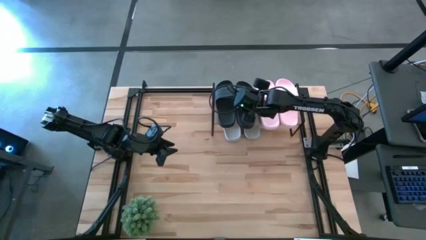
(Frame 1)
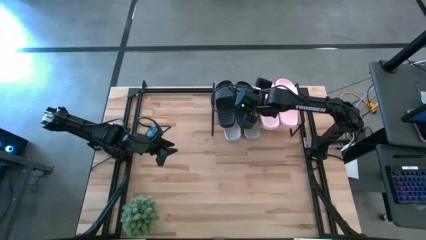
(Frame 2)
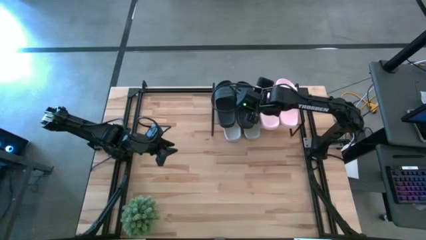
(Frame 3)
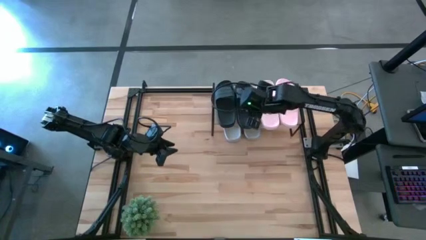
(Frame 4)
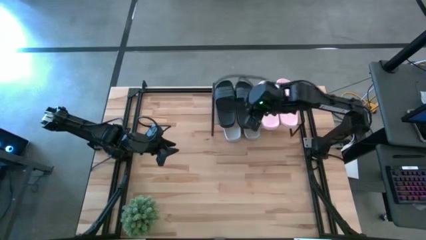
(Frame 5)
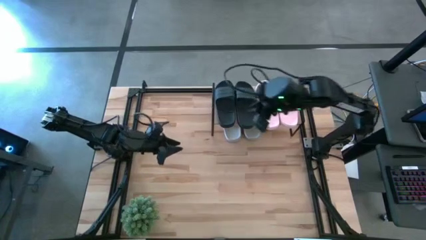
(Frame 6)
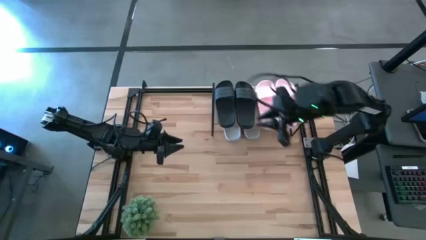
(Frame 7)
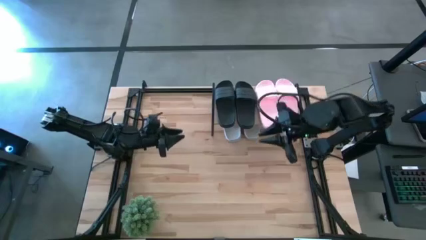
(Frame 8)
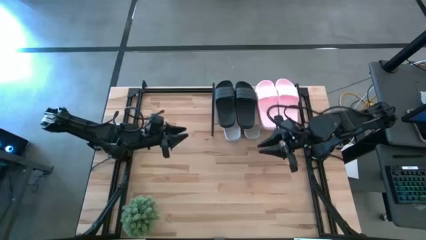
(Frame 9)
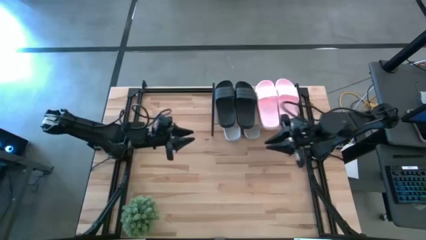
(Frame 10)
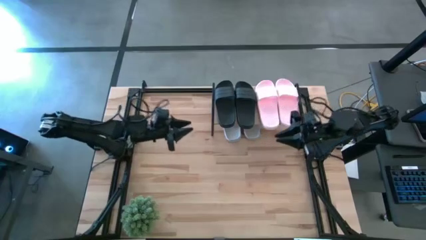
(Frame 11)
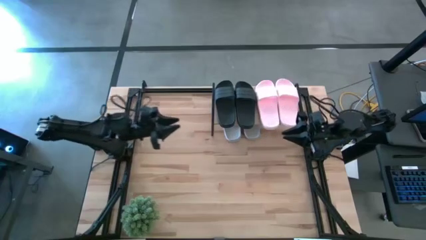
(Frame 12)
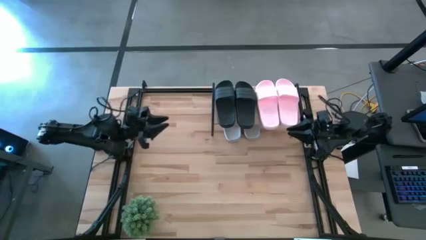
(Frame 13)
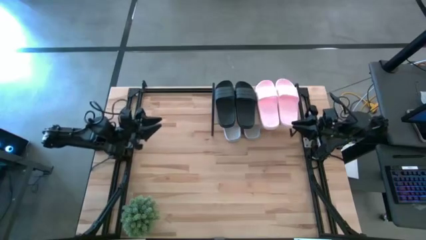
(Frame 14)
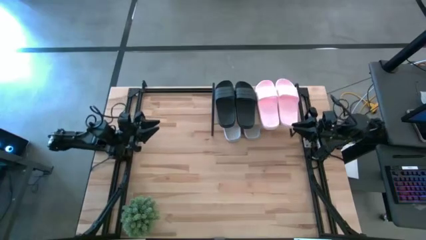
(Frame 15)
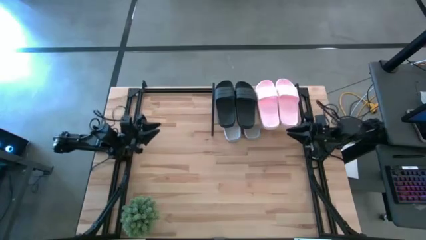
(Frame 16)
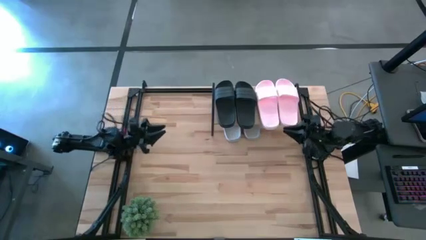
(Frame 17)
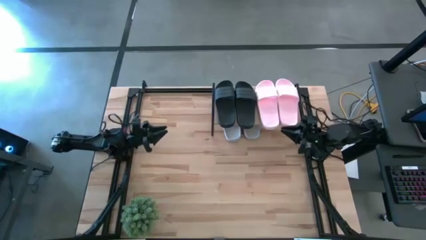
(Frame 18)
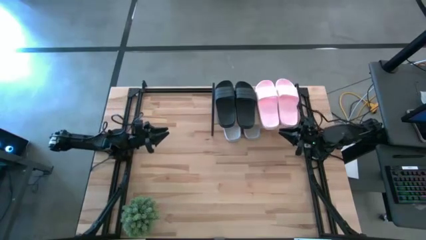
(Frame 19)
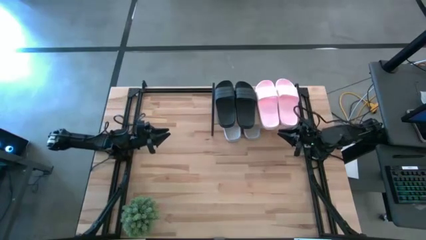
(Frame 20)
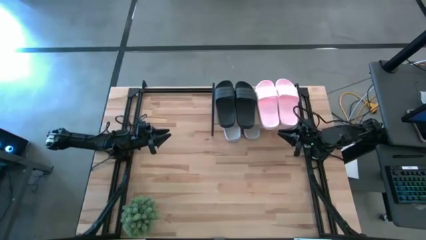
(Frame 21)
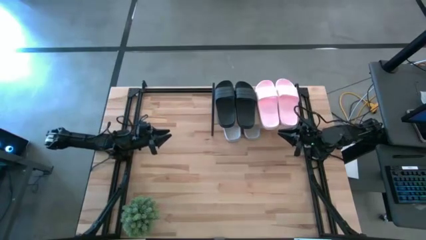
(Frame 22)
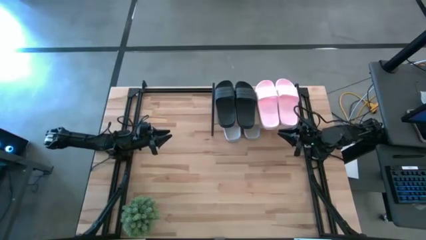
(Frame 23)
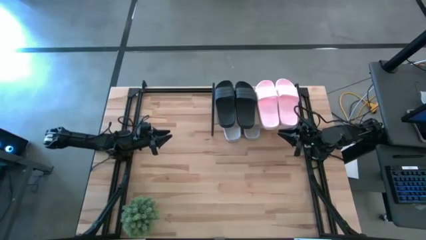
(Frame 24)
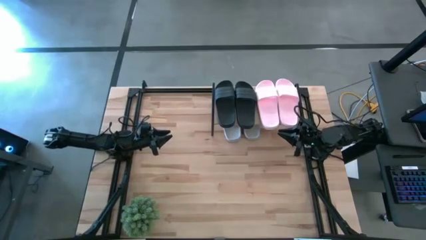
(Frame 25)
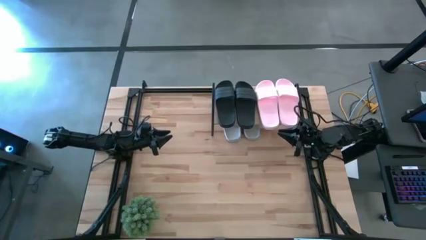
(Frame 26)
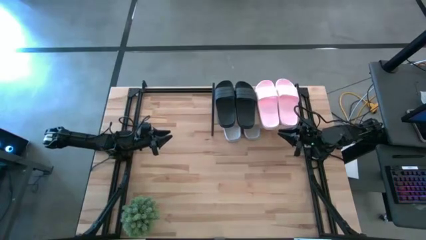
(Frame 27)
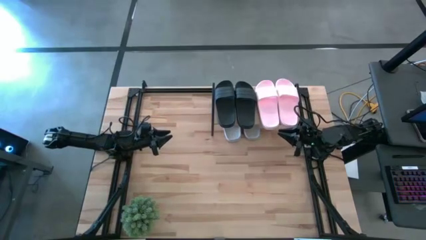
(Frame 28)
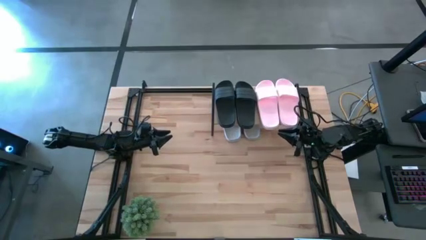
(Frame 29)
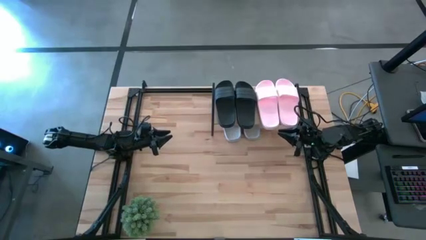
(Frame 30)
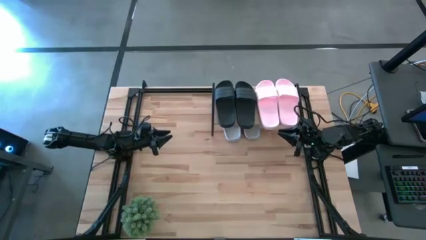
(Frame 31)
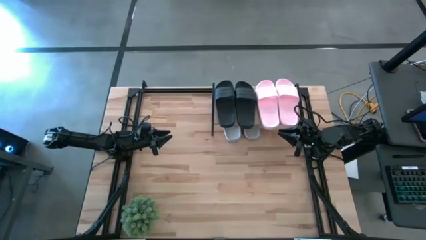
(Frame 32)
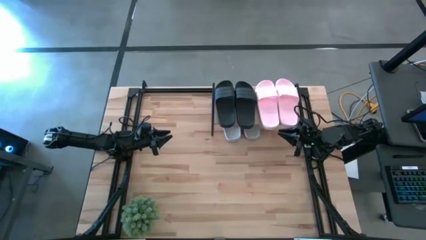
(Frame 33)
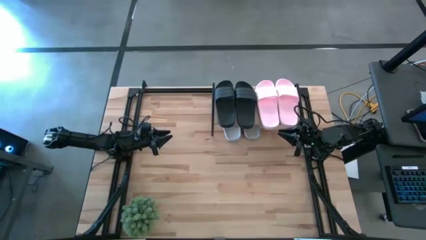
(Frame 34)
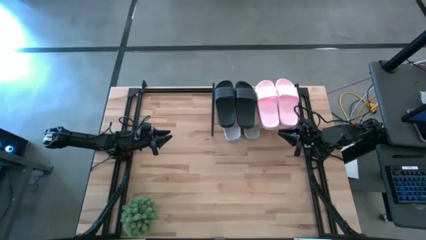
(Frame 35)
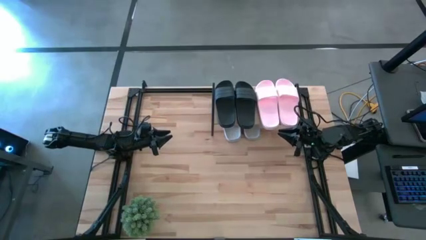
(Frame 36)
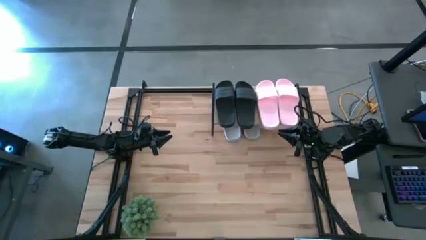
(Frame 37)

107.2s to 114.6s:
Task: Pick and place slides into the shelf
Return to Home Position

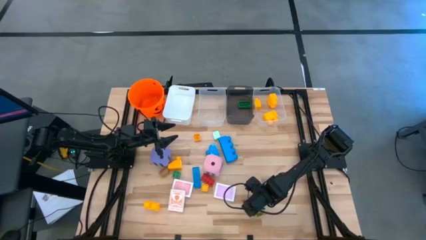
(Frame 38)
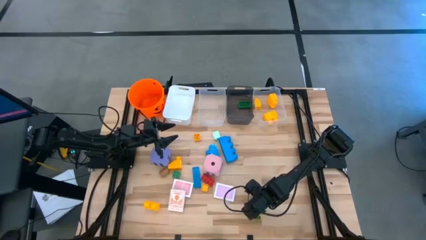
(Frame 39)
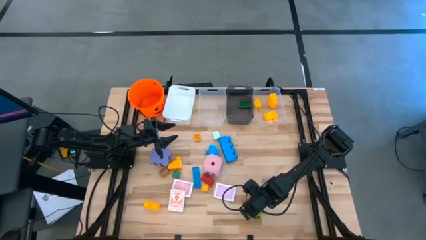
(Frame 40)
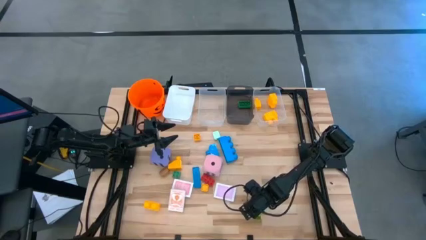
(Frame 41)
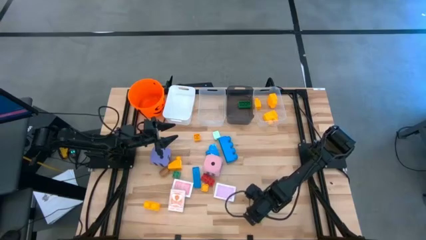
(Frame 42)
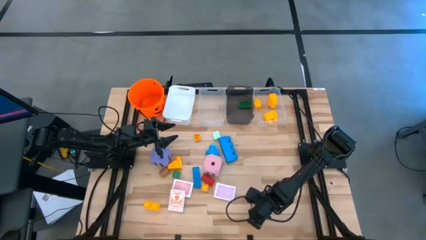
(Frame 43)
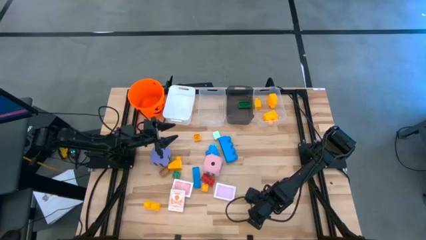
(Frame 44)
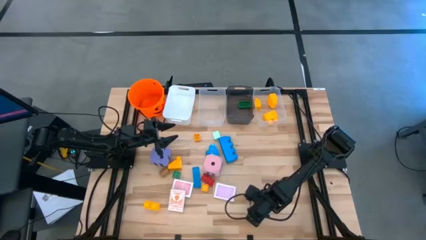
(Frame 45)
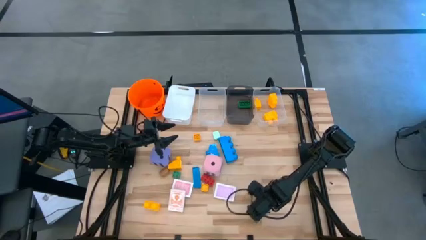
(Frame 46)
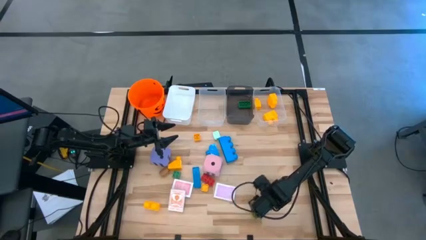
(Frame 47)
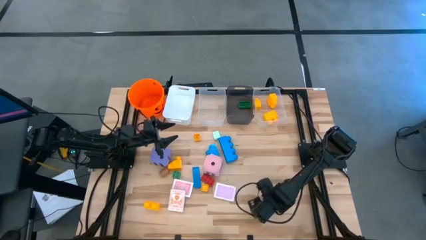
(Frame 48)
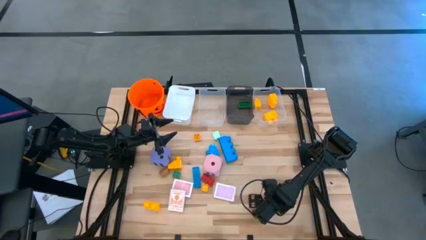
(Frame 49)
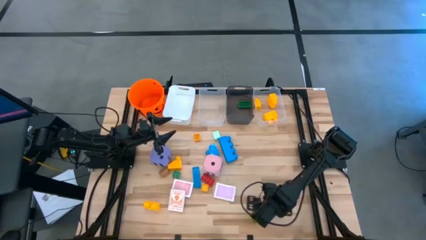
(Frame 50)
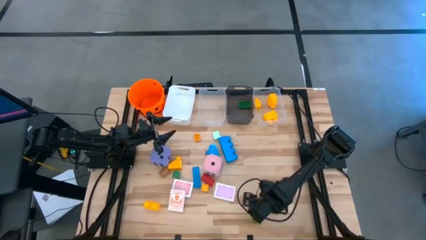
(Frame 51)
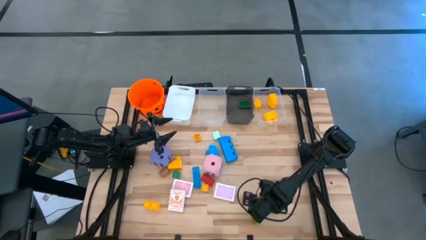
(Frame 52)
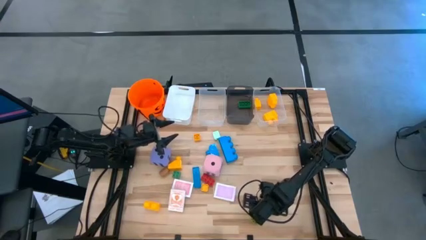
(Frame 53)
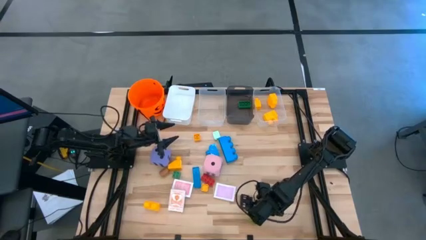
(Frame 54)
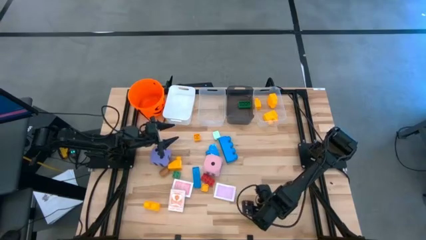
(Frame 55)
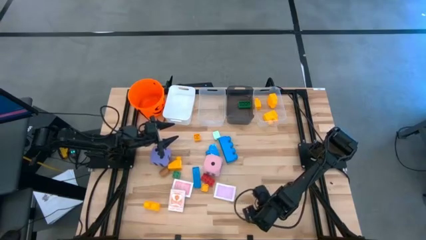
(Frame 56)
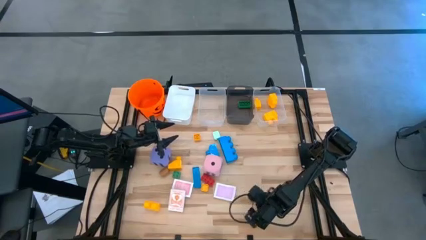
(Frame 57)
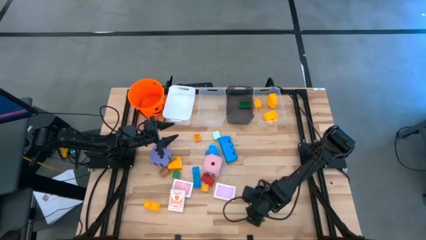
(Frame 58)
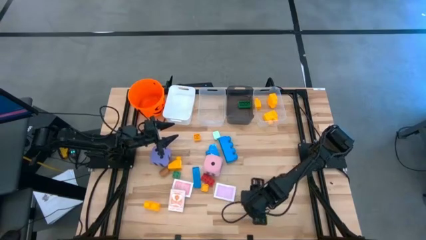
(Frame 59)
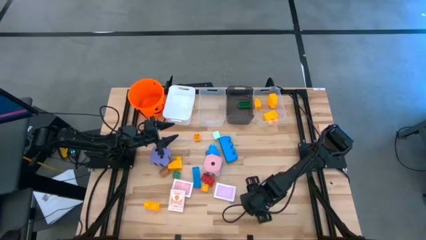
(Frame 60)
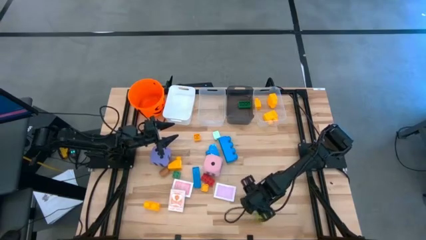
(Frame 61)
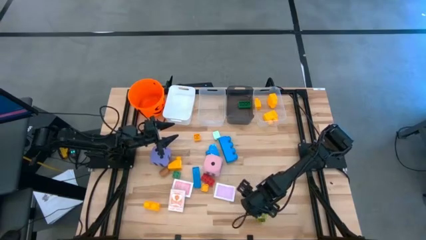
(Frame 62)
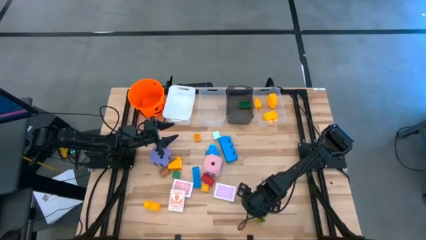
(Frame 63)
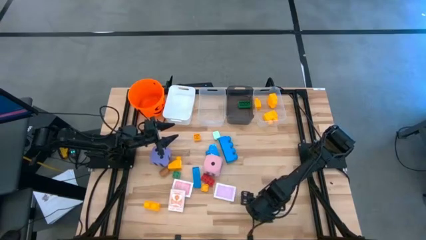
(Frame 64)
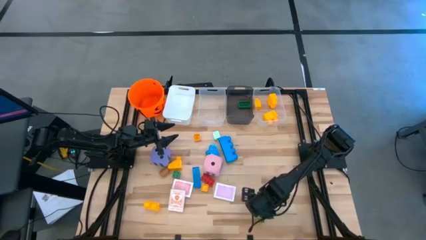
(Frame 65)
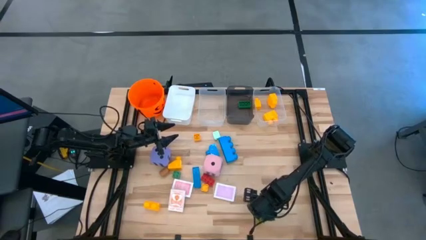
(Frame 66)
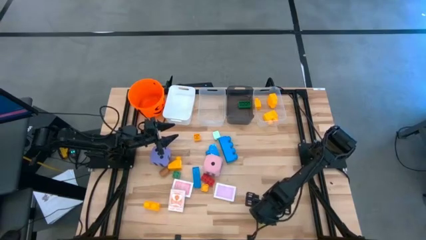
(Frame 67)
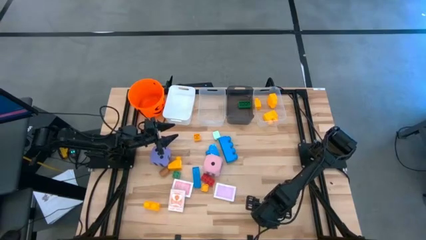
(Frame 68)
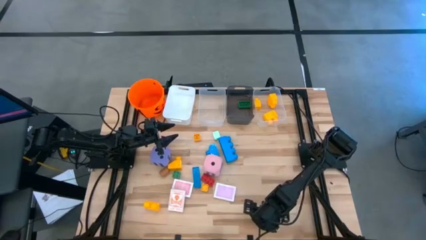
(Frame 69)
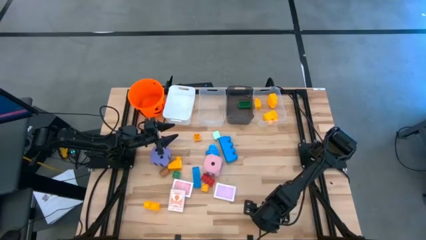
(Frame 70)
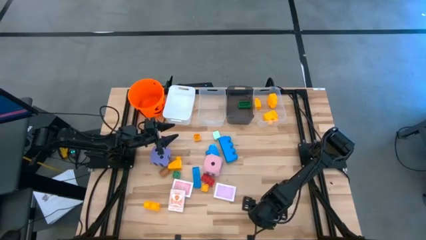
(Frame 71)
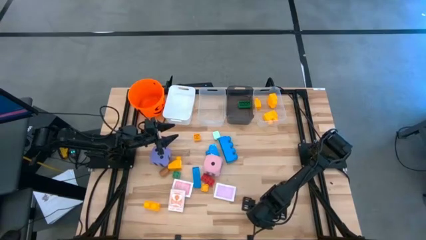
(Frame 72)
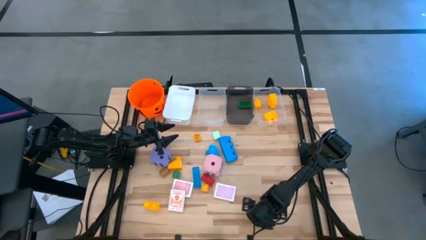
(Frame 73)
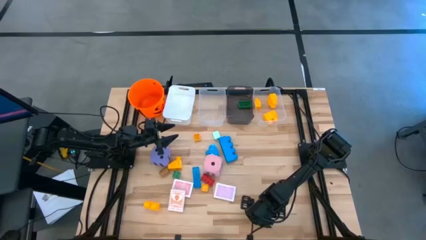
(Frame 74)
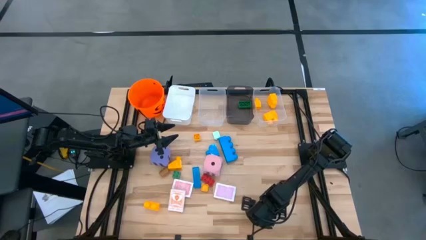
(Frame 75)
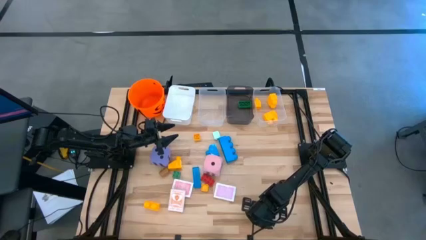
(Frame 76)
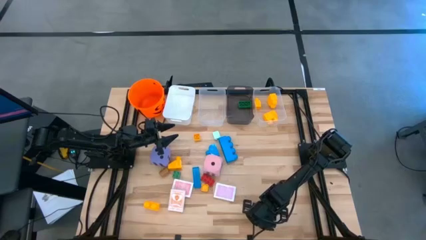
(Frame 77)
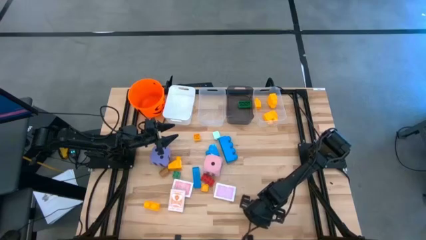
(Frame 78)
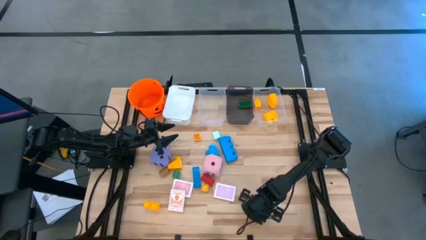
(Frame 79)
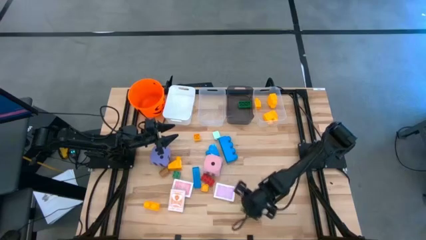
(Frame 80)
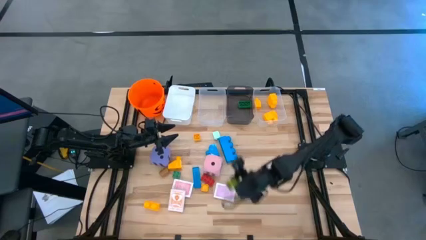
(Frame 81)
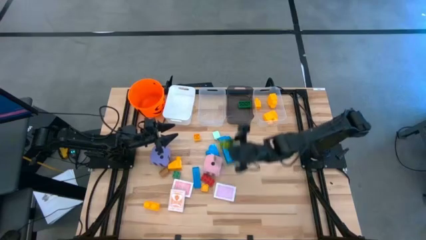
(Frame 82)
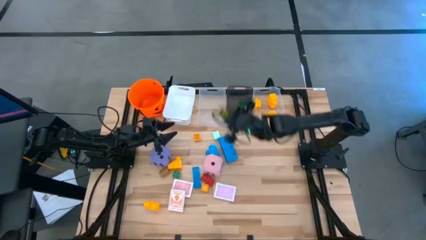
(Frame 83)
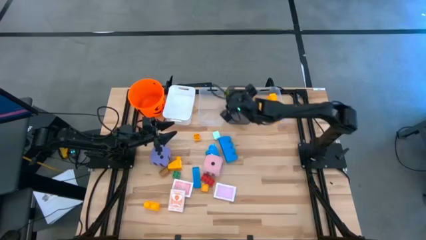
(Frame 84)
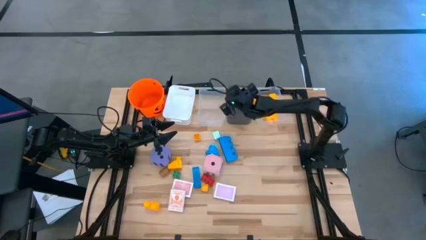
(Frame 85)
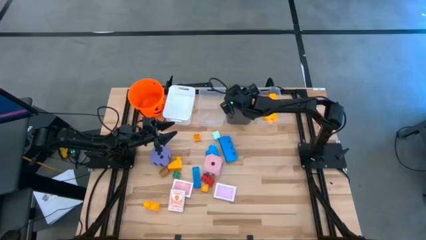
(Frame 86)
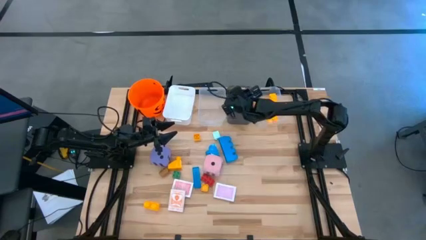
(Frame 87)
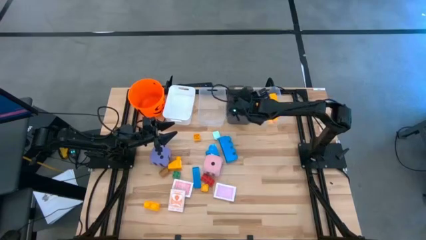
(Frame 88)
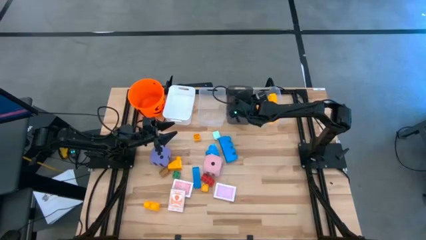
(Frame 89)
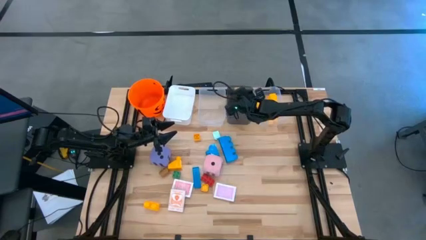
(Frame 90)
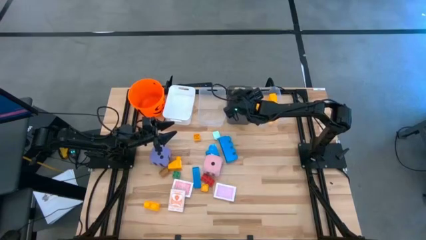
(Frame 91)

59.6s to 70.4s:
Task: Pick & Place Toys
Put the small light green game piece into the black bin
